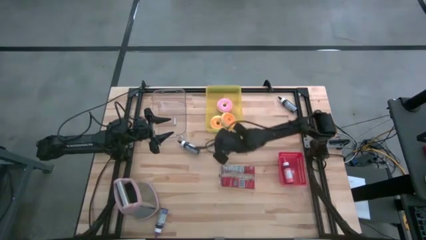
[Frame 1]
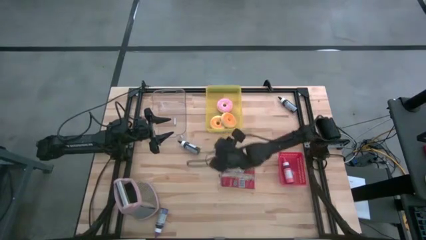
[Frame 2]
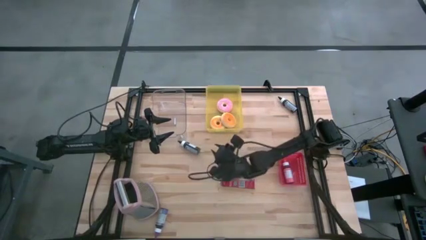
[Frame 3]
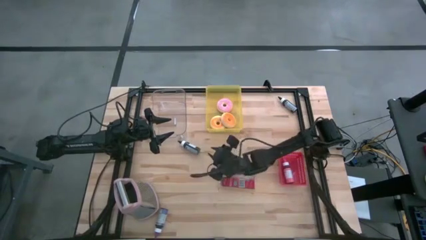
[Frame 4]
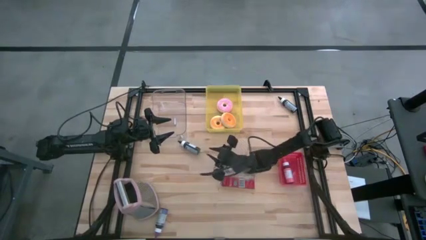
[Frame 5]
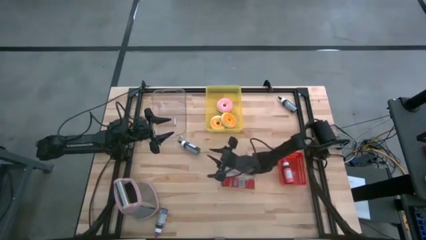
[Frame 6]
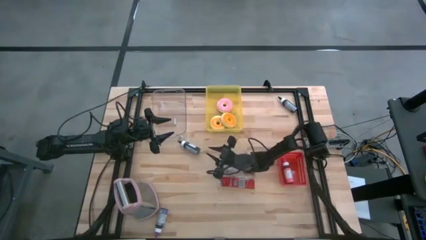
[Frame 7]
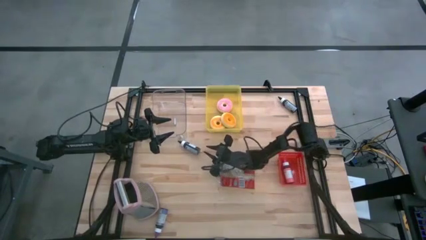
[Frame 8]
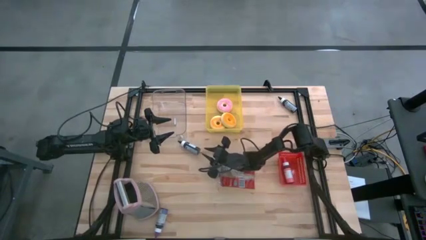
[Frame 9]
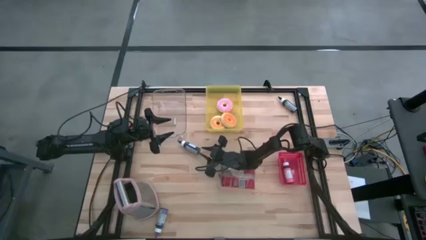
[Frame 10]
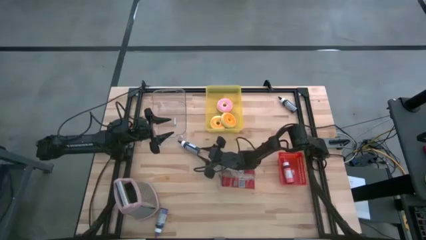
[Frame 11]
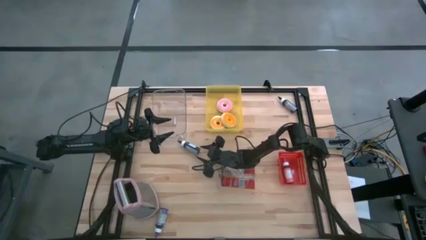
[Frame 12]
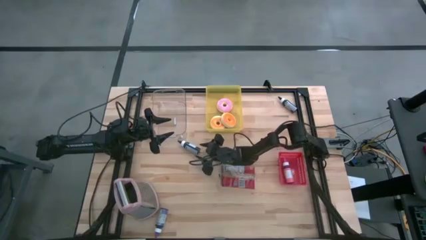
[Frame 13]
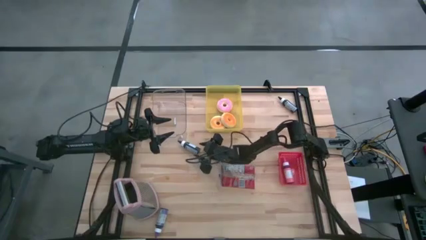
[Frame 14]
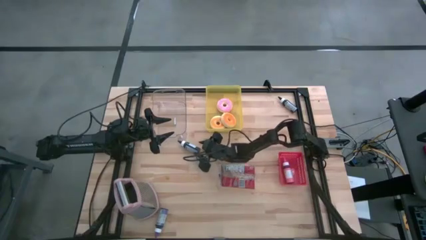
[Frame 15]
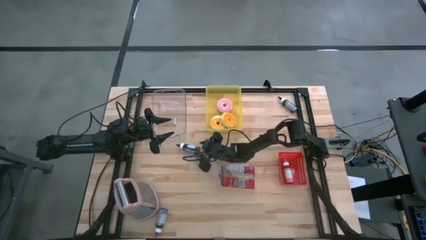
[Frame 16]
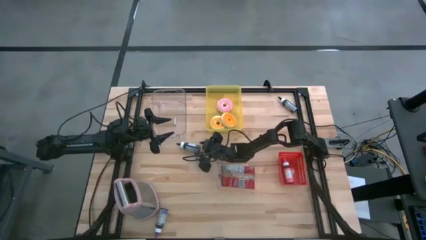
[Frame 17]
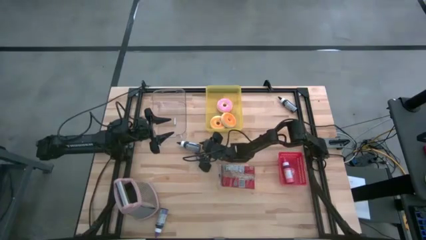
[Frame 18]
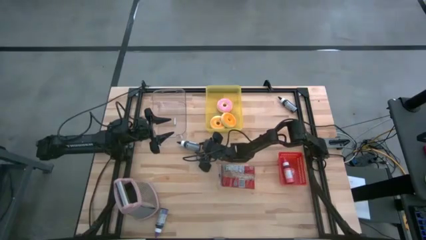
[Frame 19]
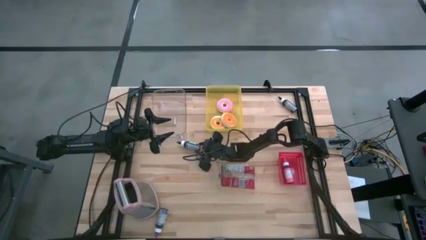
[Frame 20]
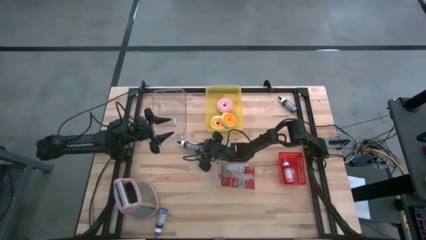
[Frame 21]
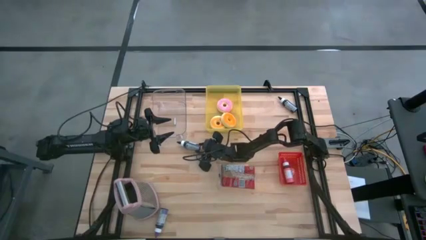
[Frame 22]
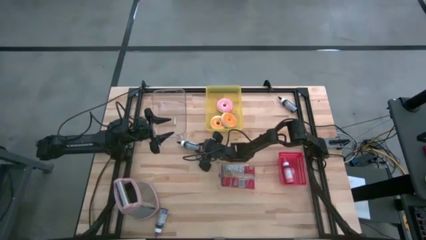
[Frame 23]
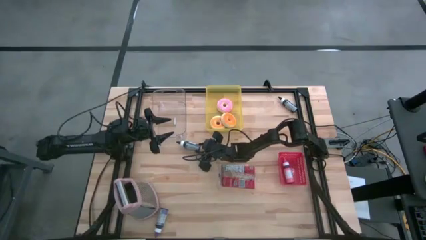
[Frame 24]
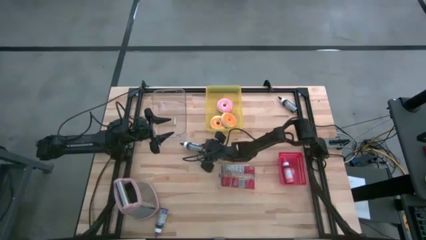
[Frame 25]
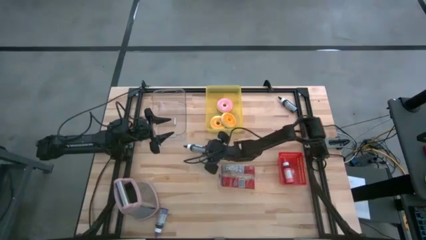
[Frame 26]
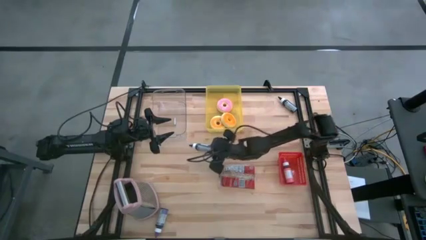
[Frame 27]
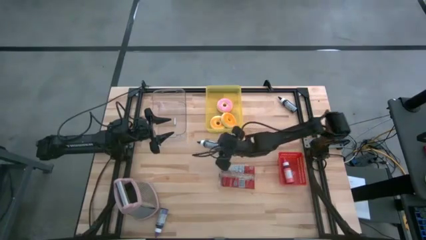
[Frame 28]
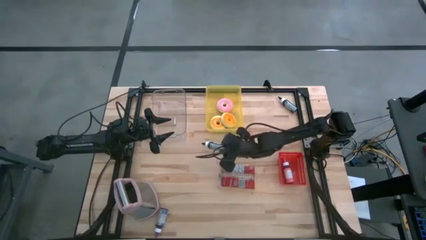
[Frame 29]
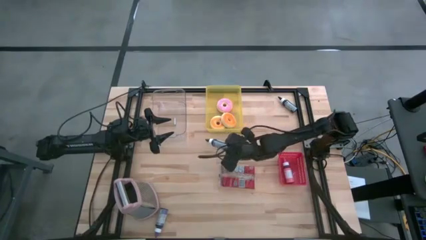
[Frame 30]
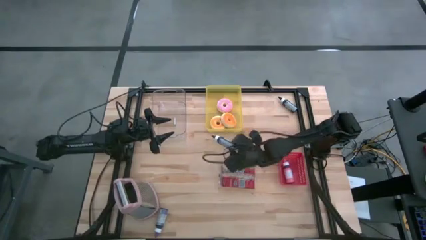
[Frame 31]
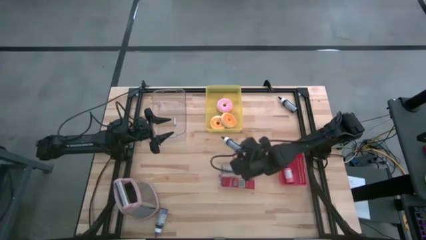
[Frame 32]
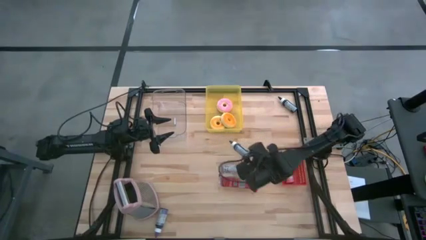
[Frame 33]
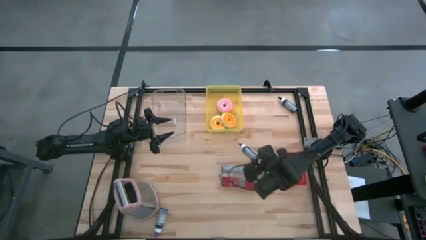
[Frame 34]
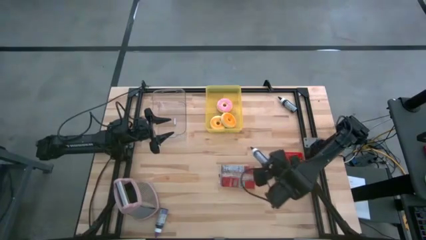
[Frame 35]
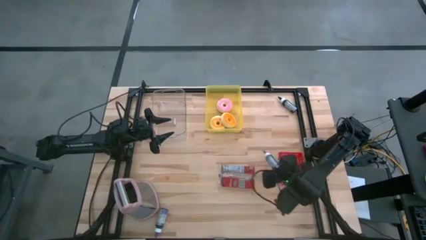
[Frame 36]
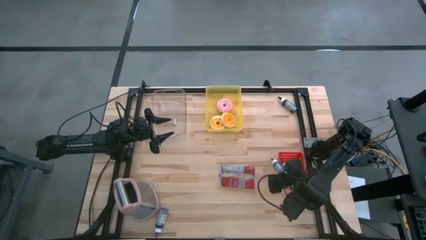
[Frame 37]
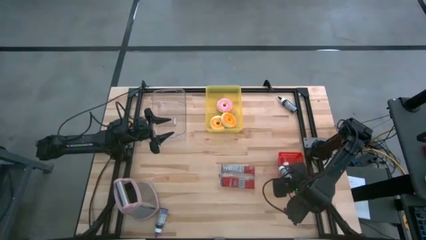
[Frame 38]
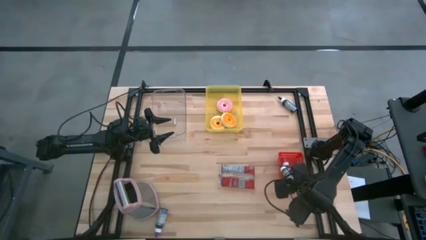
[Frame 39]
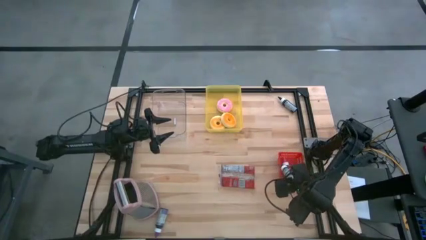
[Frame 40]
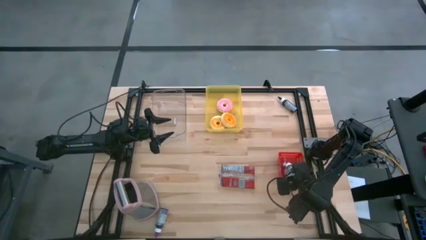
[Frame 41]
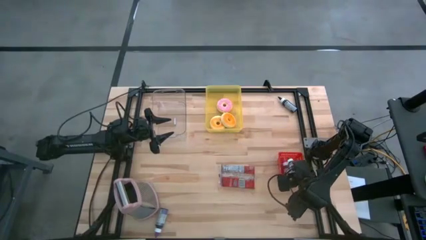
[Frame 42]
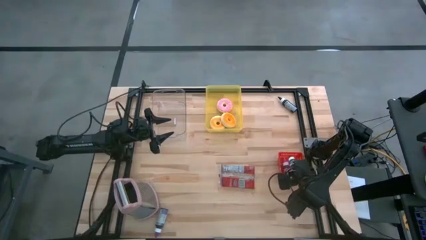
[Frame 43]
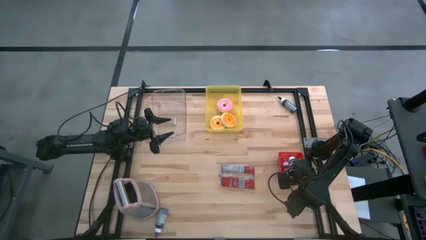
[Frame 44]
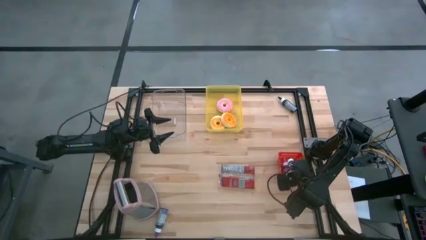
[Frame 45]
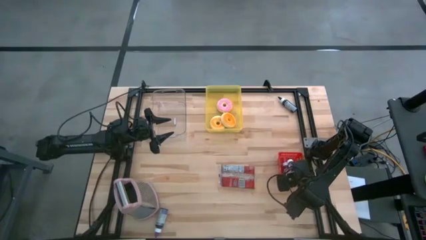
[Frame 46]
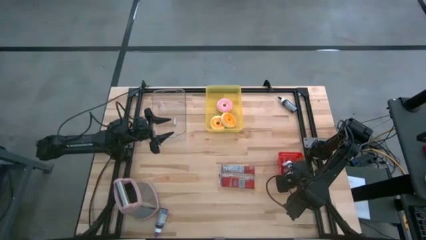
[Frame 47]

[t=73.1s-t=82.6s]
Task: Pick & Place Food Item
Put the left black food coloring bottle into the red bin

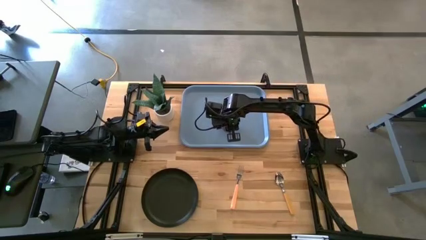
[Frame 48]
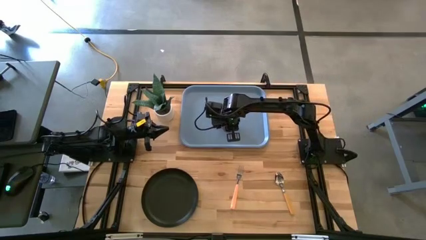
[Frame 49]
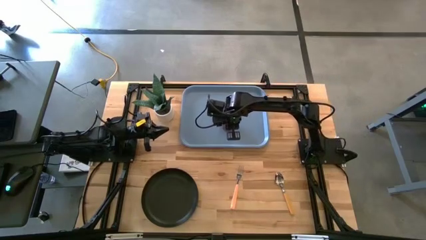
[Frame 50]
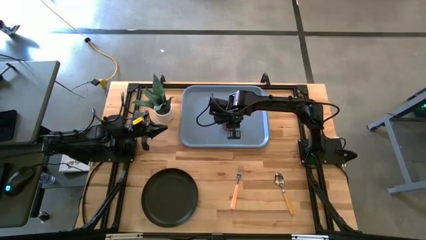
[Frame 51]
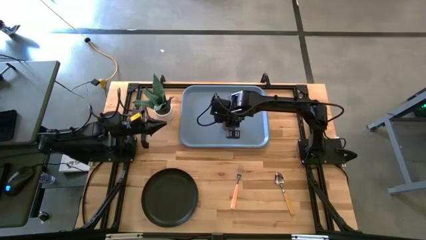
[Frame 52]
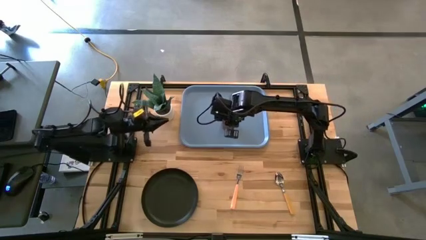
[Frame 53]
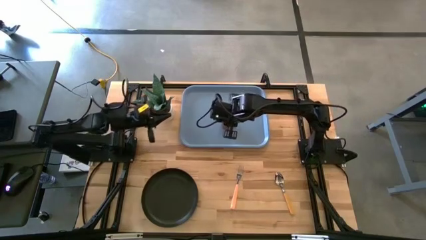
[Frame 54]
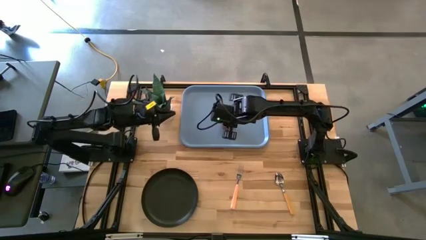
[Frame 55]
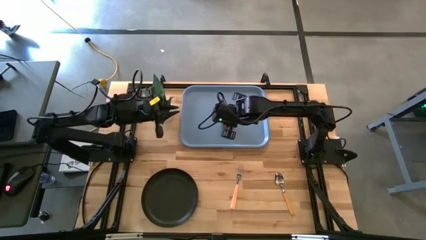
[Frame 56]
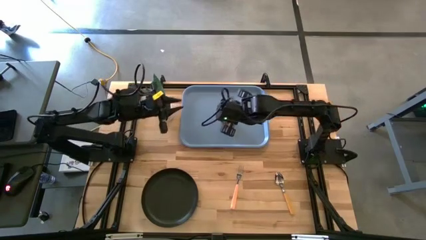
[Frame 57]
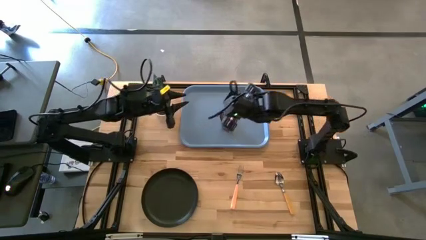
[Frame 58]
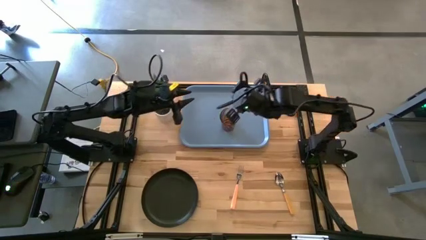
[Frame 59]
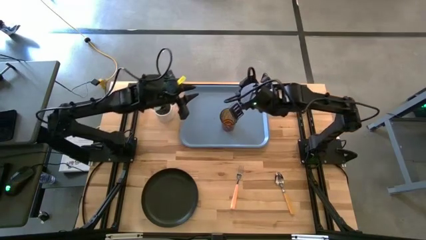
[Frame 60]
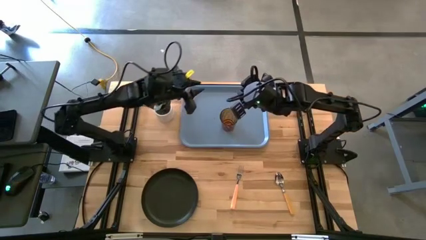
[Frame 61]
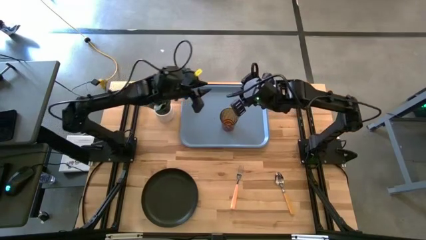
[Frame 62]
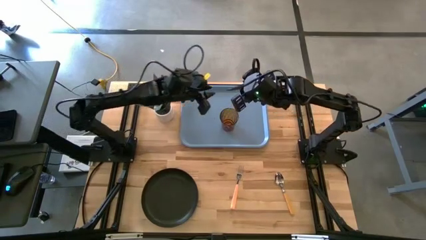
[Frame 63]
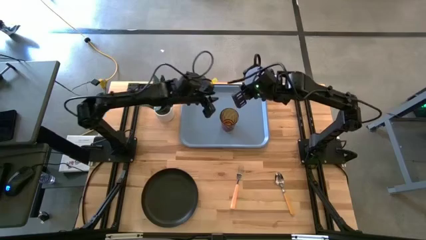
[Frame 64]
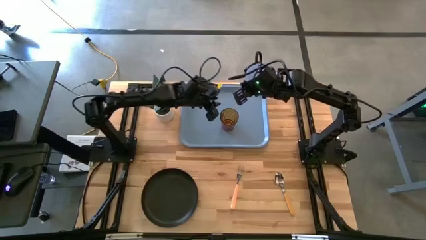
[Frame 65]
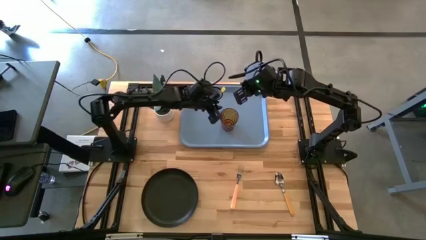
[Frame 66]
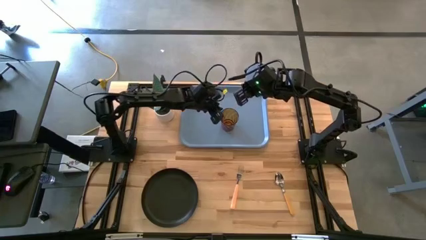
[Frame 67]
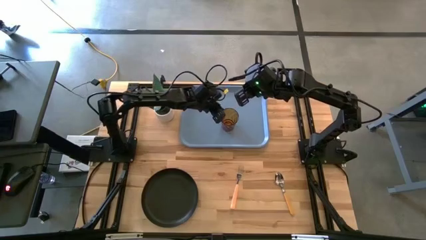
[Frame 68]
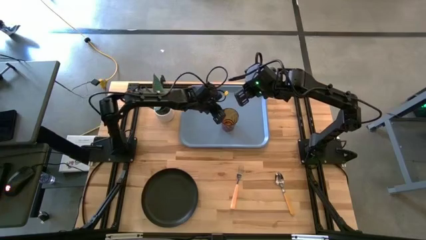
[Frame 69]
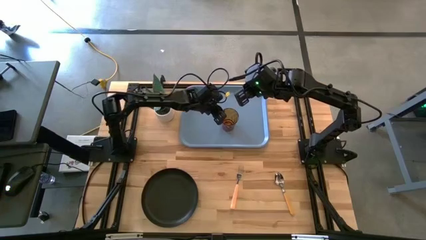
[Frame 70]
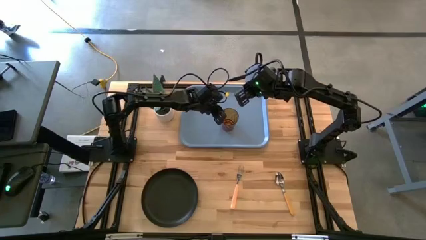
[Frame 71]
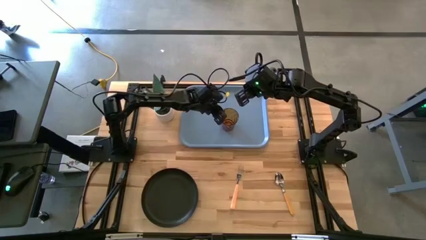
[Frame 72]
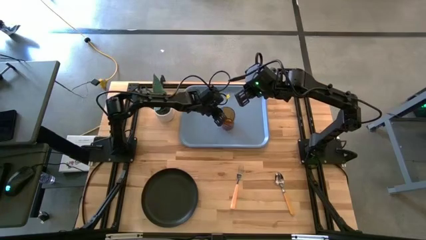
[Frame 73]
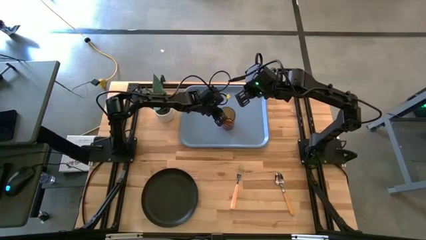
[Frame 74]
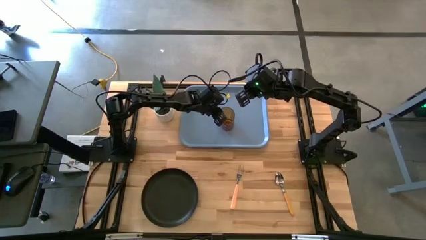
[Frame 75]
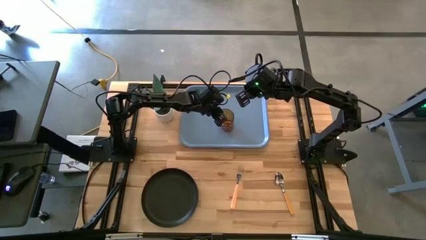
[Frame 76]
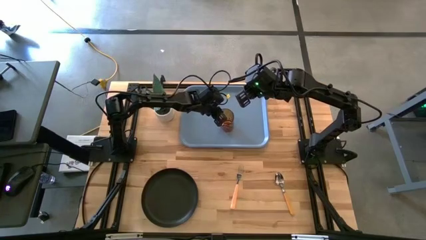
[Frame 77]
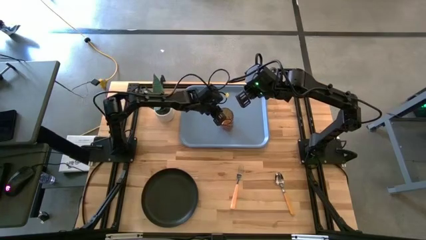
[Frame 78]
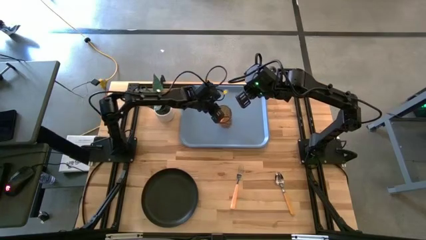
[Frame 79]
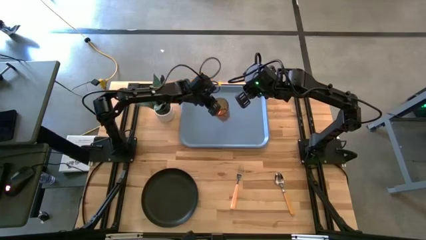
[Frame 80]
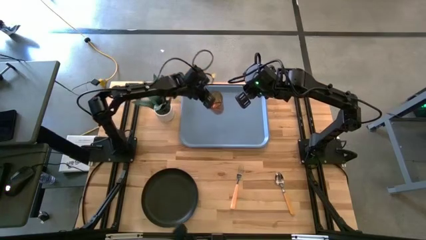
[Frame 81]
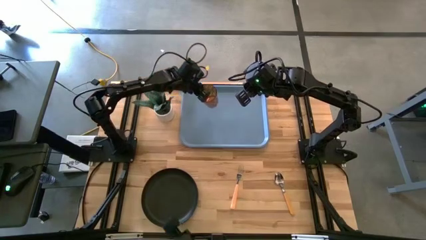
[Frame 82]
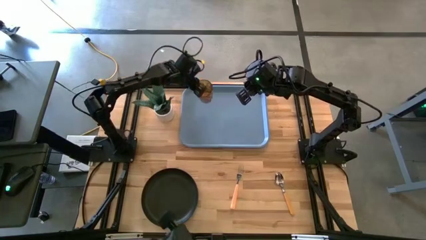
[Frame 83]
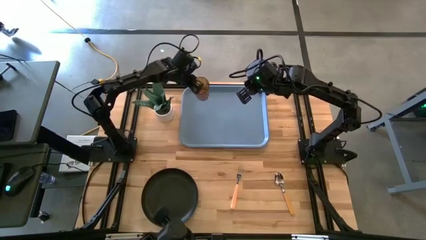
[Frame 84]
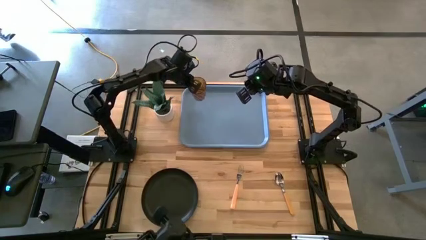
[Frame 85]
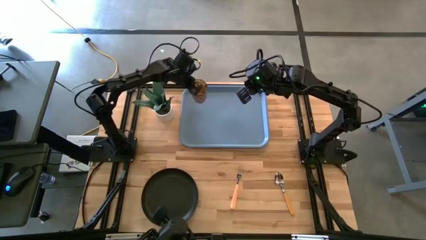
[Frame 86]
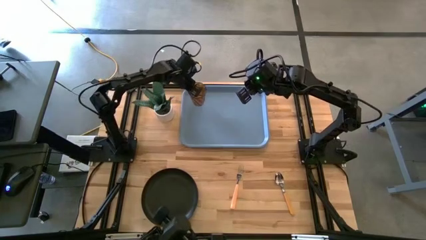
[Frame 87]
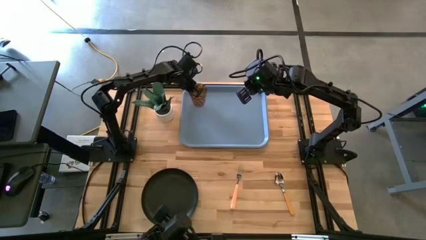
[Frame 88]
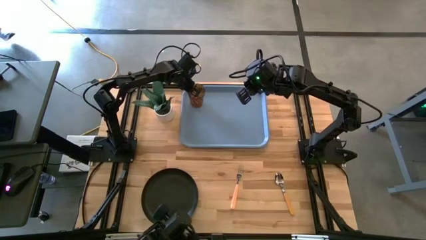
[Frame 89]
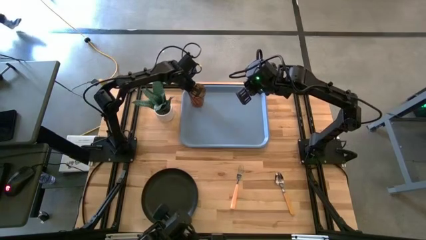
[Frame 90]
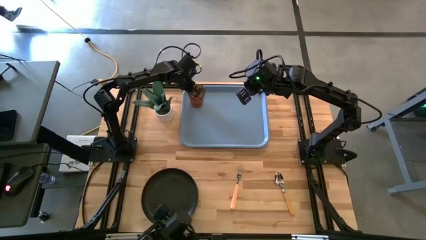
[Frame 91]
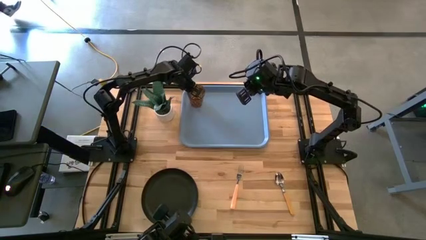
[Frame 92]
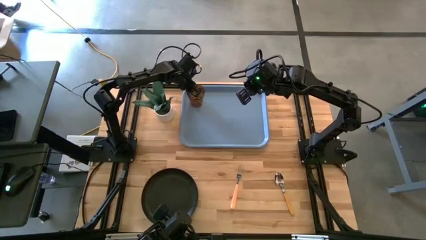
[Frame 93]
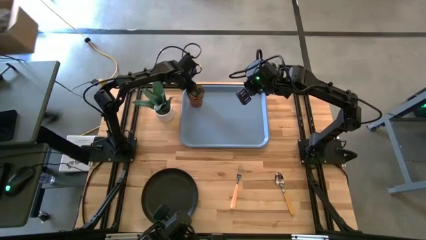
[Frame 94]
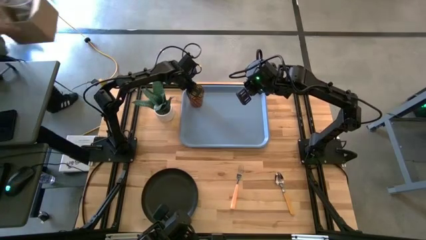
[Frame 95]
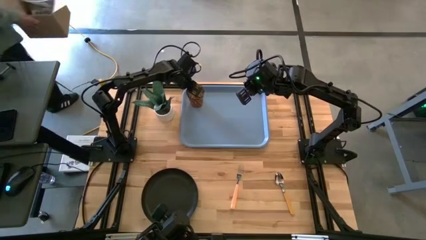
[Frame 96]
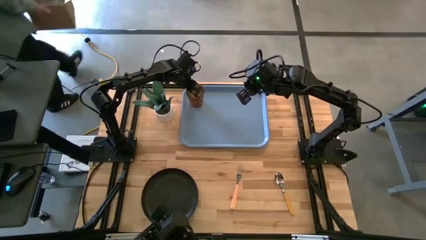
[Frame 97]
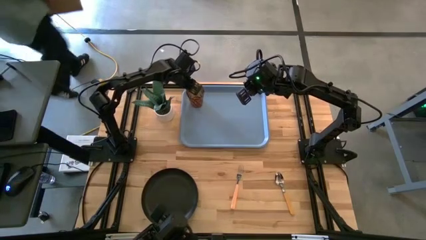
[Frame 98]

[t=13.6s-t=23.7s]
Task: Pick and place plate/cup/fork/spoon on tray
Put the yellow glass on the blue tray
